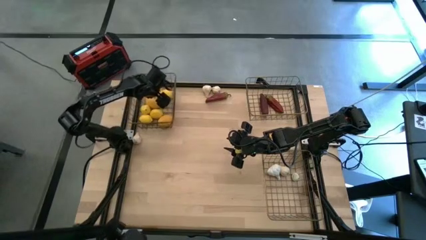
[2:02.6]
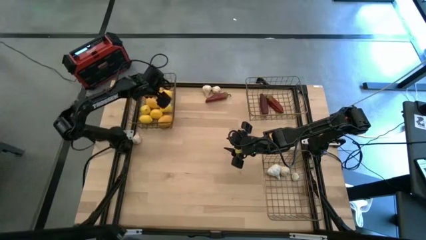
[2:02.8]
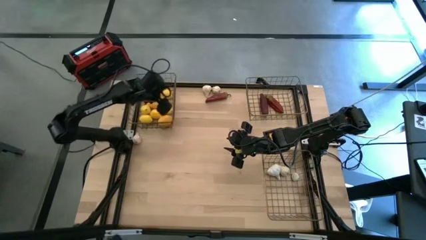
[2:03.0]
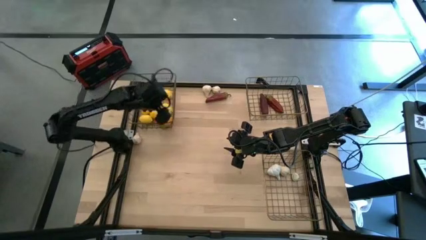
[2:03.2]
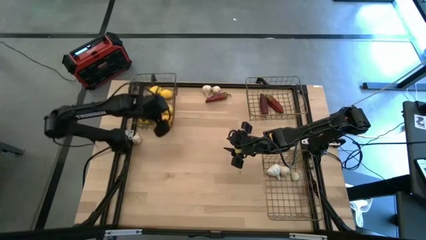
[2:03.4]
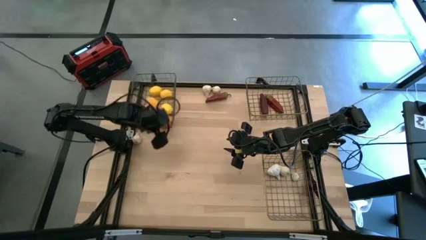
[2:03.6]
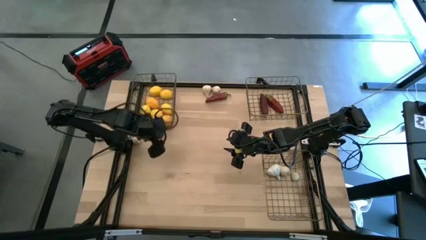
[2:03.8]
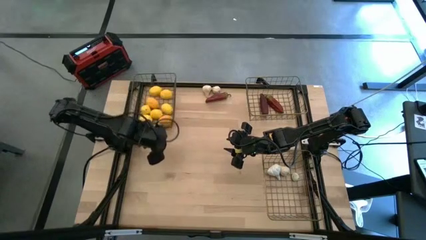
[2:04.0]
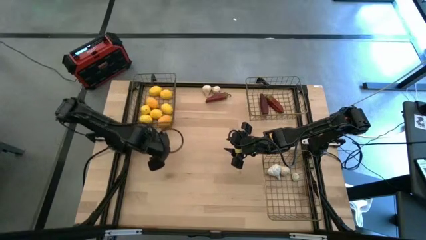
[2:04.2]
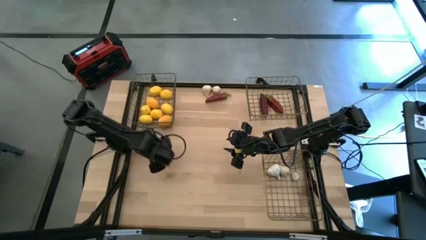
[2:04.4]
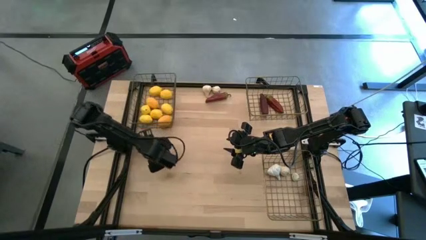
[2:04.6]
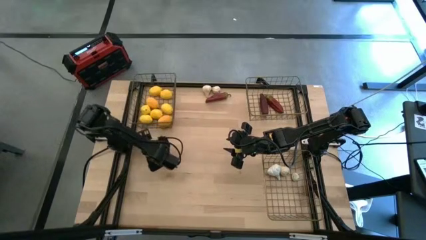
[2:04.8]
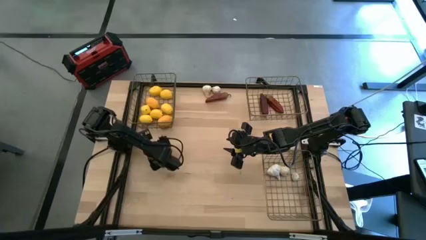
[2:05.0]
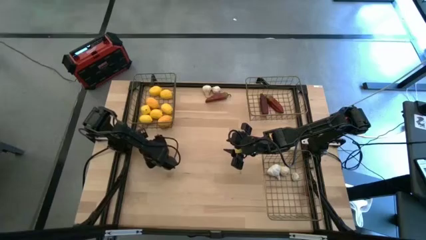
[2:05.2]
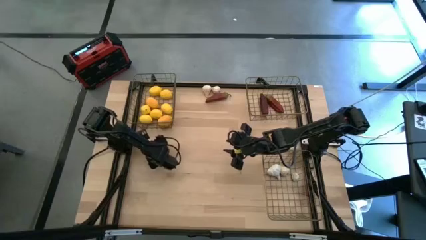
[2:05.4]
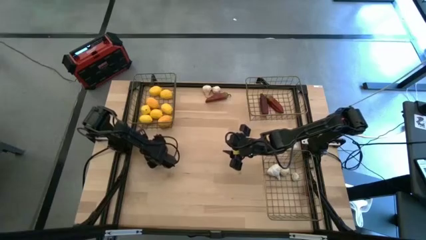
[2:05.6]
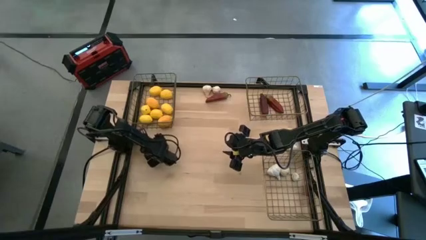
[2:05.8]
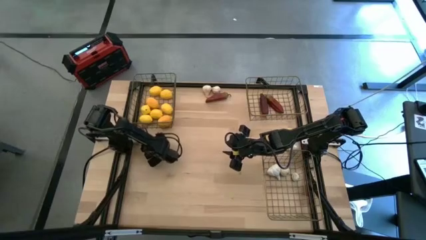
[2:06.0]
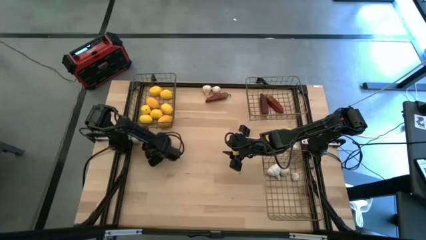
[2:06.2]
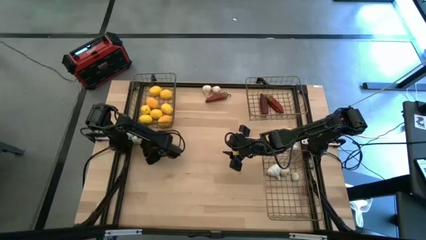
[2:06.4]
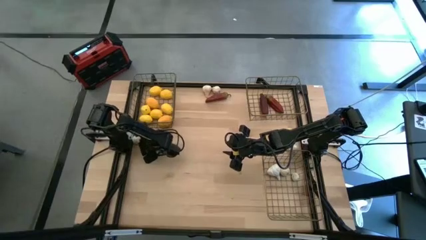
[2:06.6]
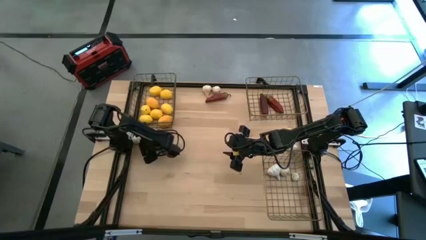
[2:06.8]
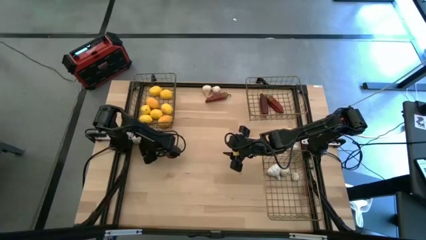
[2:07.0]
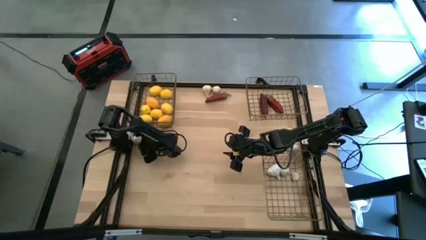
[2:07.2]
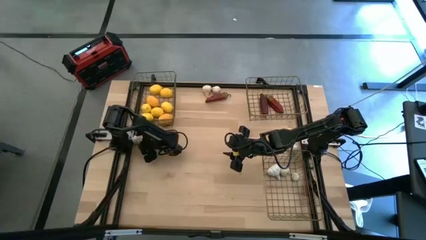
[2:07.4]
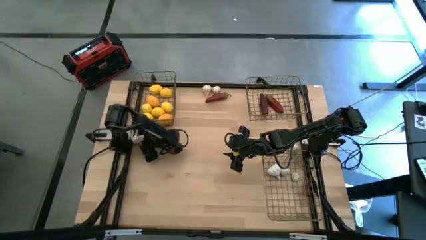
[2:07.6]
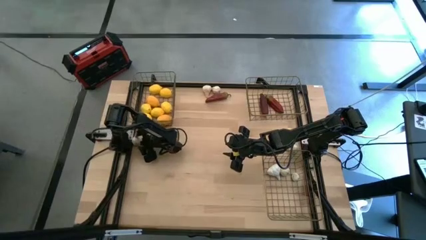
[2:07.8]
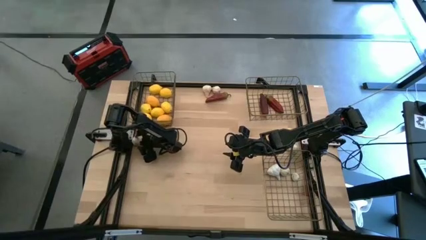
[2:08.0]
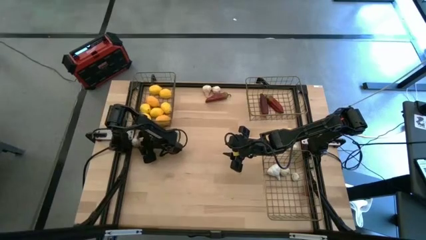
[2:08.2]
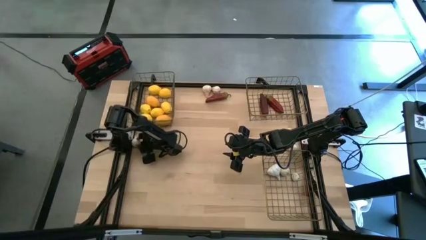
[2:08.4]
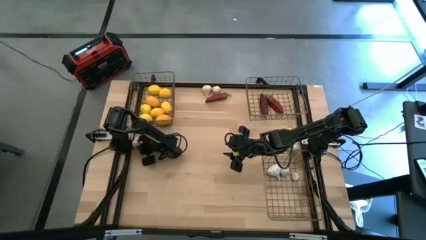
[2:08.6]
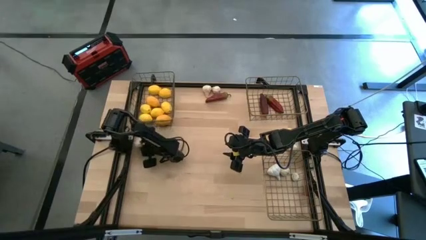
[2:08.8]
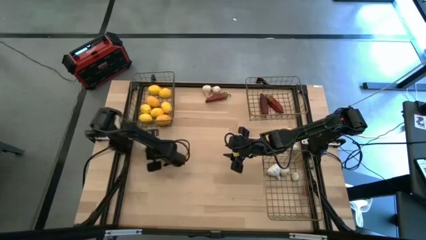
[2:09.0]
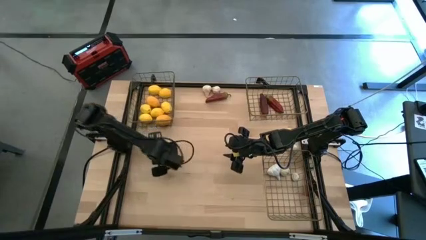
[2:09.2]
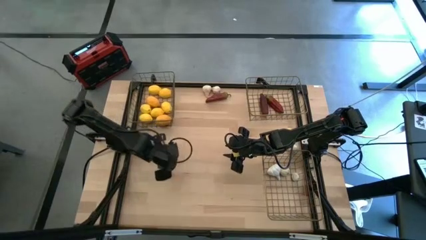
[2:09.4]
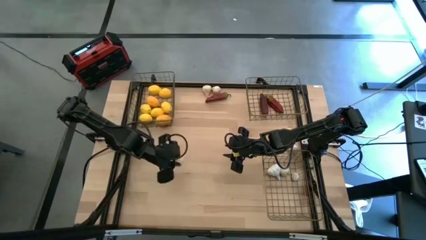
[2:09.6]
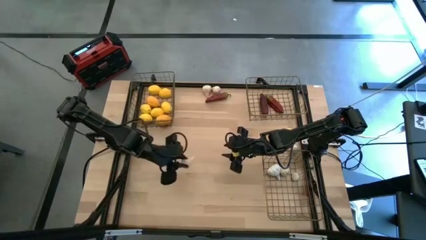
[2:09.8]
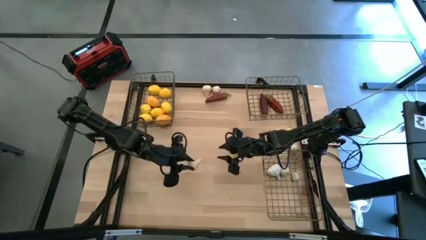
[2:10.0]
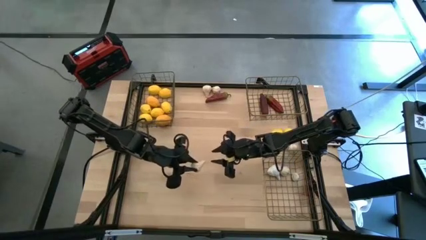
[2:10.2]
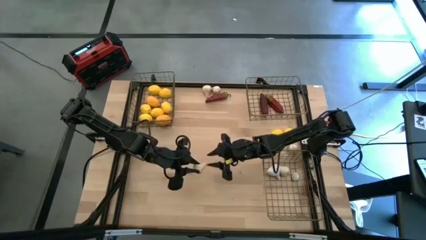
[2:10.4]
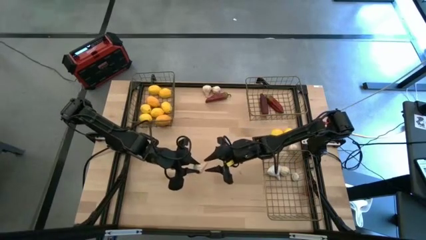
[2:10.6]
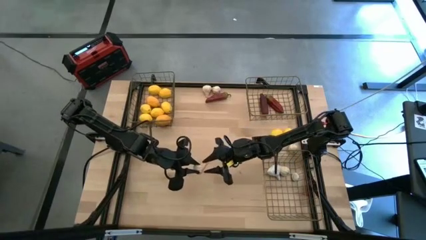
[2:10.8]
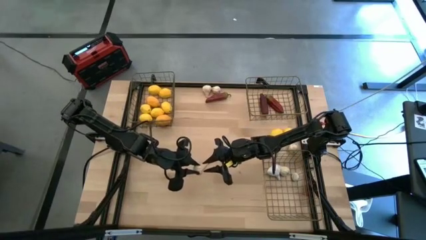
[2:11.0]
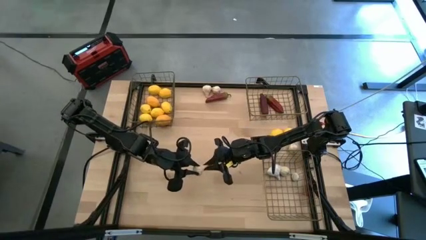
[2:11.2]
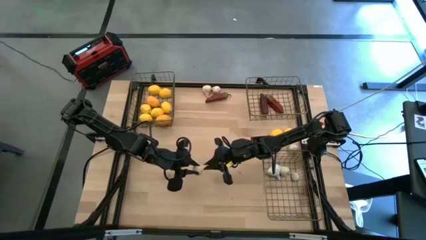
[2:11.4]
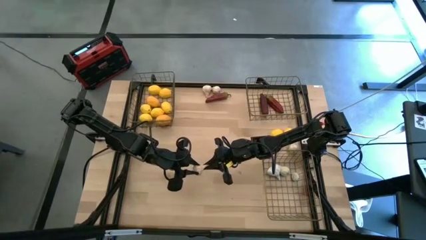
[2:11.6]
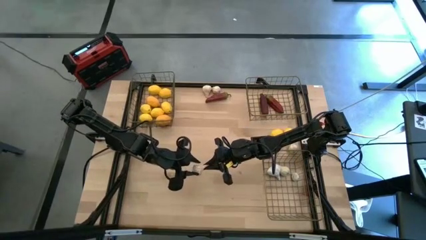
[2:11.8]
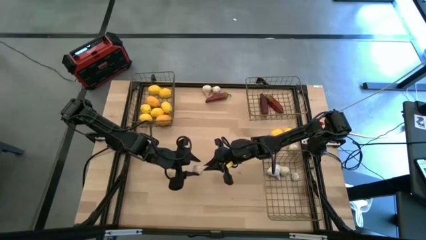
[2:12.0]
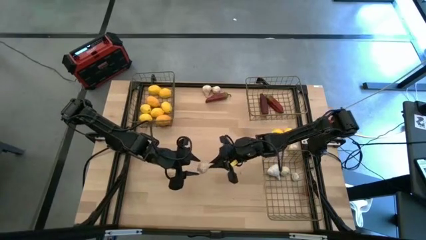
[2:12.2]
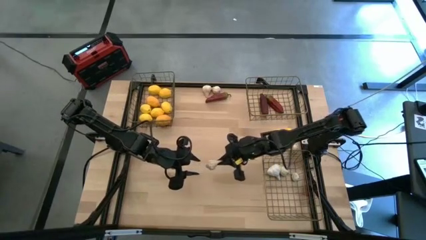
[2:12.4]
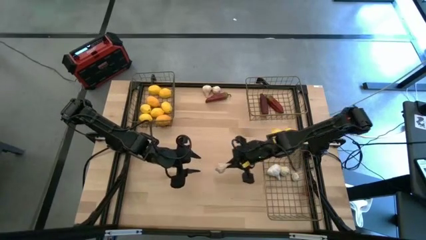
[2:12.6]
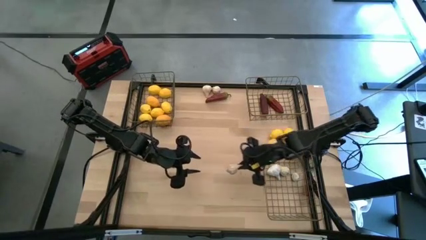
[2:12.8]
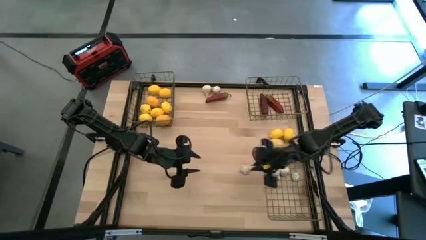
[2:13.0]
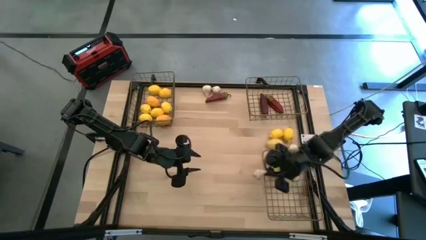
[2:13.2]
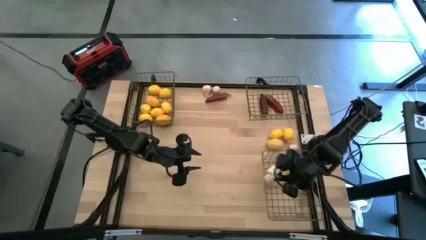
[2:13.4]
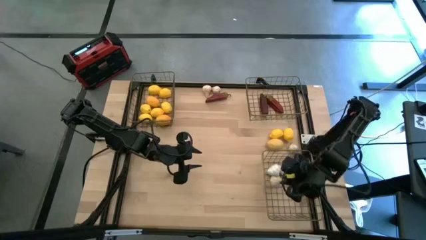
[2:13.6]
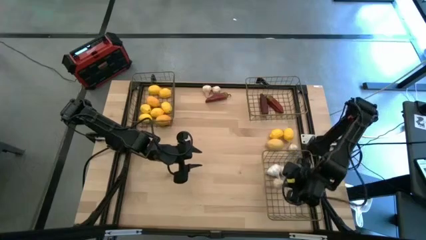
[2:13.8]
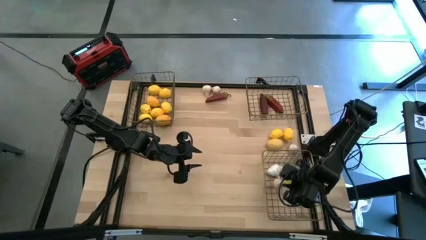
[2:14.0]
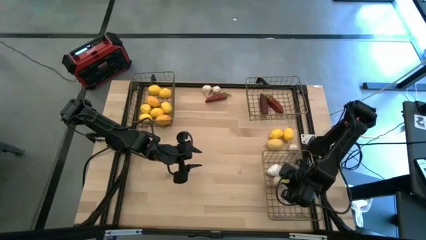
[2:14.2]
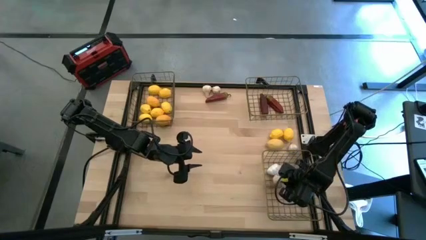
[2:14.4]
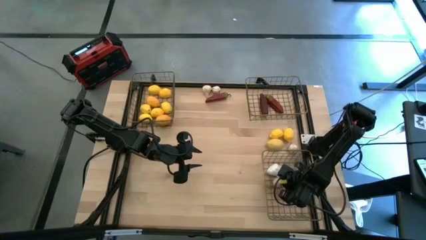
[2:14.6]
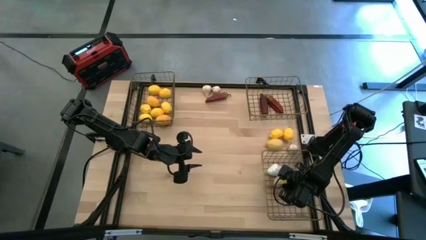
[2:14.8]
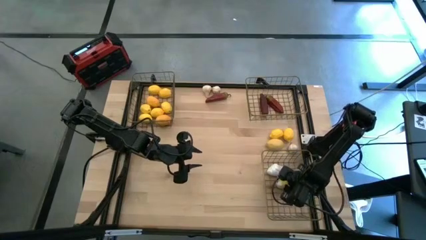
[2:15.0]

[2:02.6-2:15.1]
Task: Sort produce into baskets
Put the white garlic into the bottom wire basket

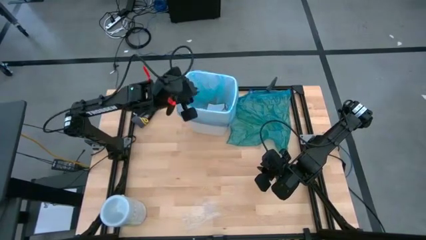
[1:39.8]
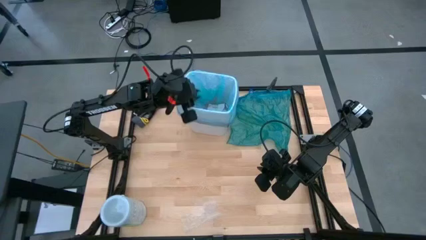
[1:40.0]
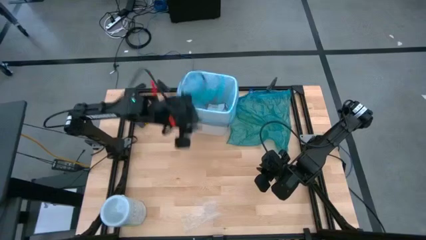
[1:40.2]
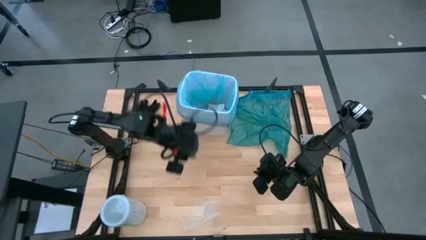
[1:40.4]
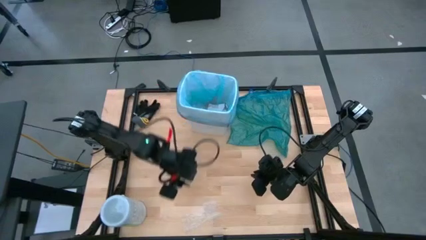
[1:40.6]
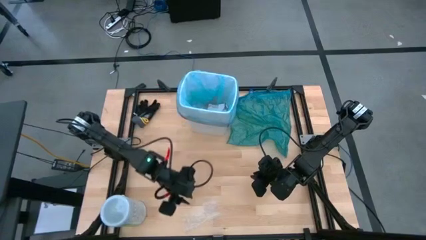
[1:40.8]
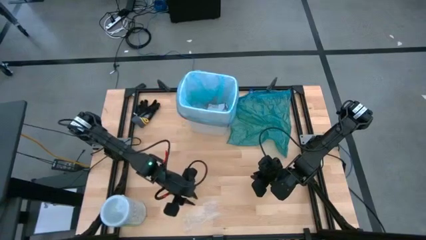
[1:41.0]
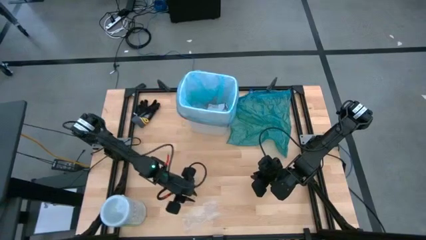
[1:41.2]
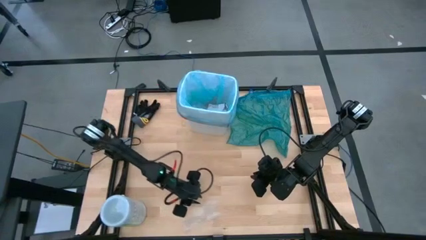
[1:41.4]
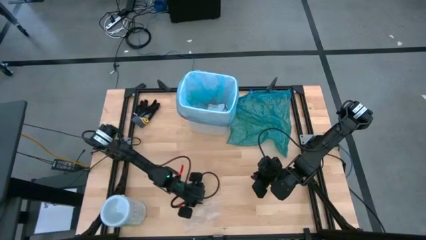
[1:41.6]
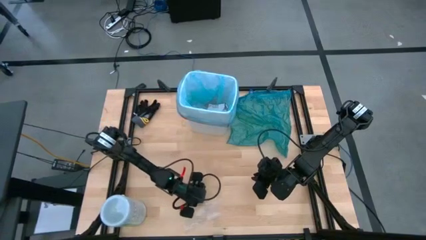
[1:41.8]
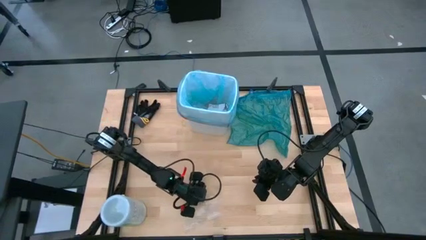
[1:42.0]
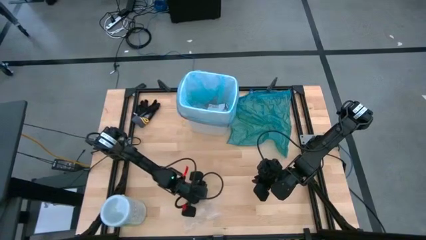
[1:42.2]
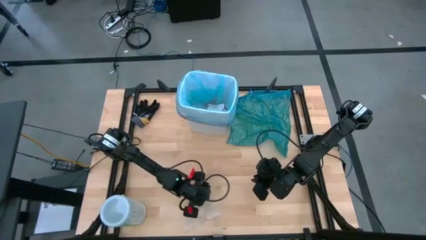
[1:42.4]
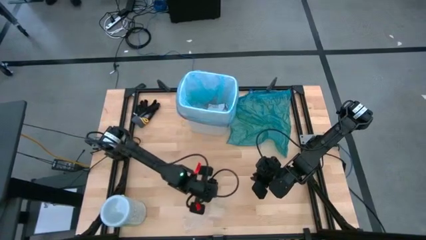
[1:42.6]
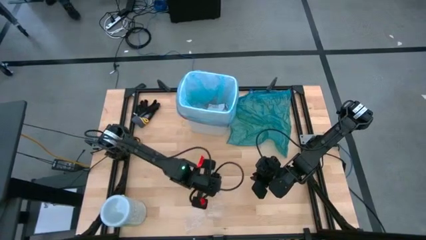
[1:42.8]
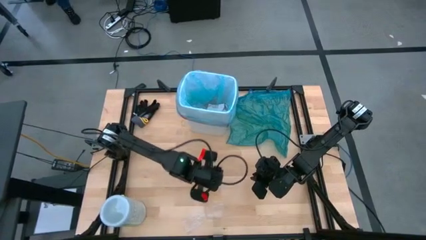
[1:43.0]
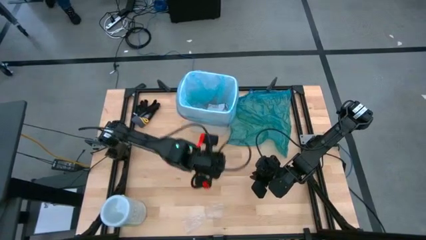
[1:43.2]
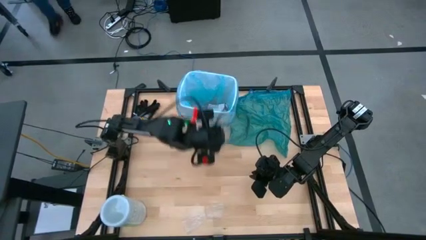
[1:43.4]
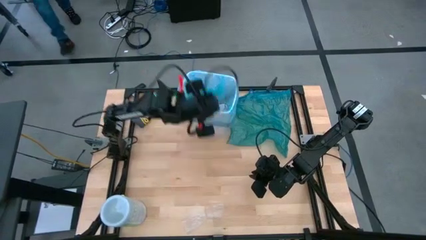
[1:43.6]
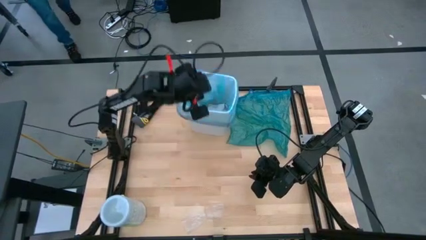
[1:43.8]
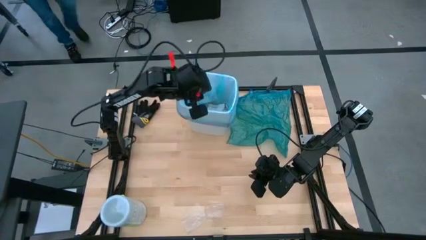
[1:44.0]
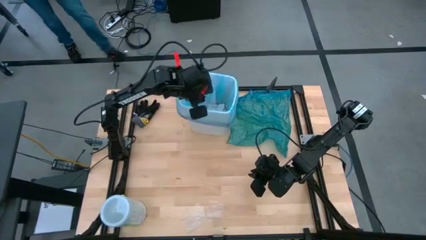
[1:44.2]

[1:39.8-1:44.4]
Task: place trash/remove bag and relplace
Put the transparent plastic into the trash bin
